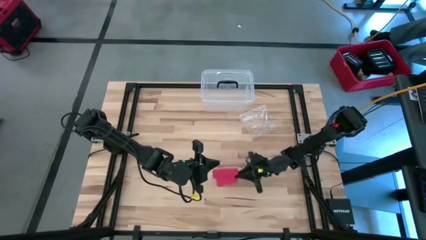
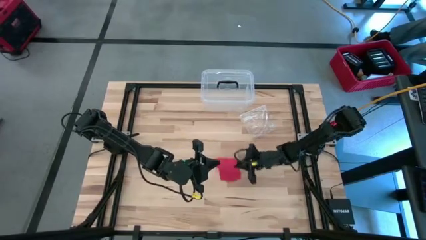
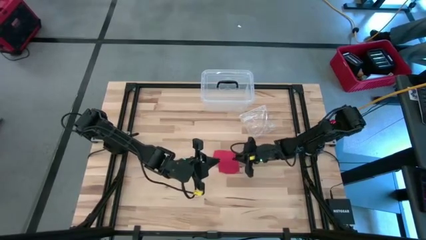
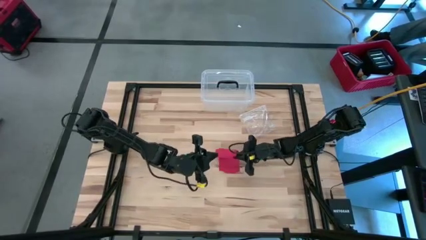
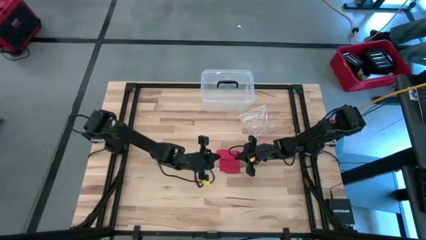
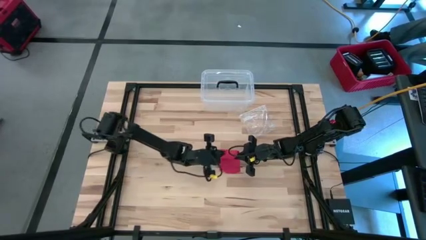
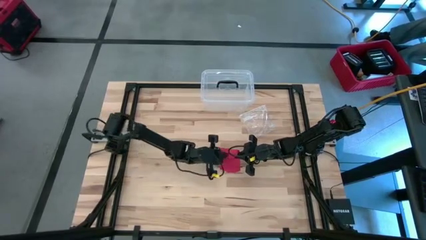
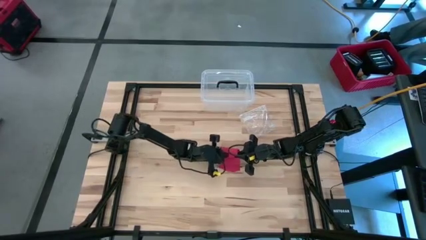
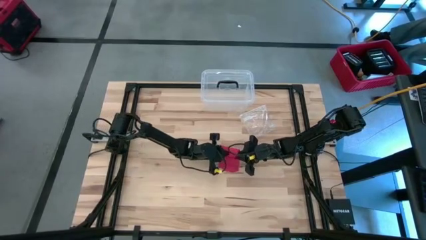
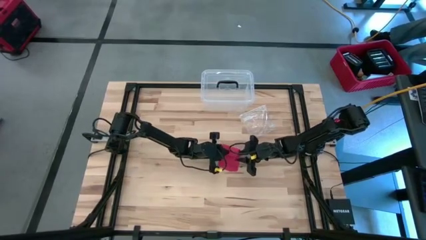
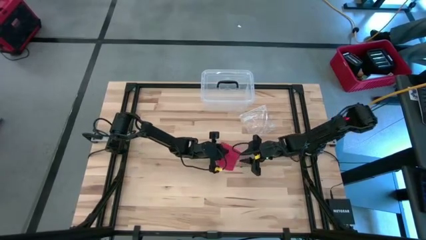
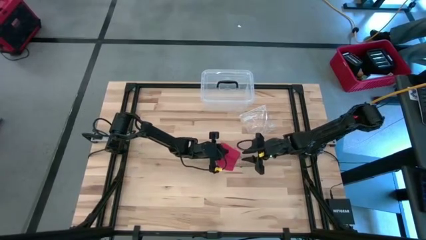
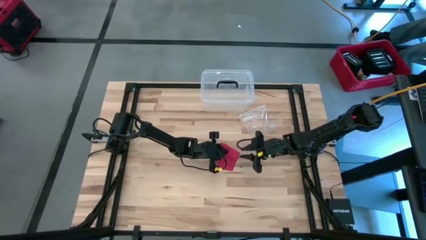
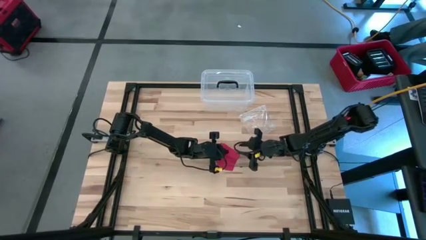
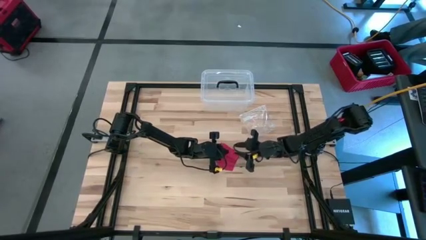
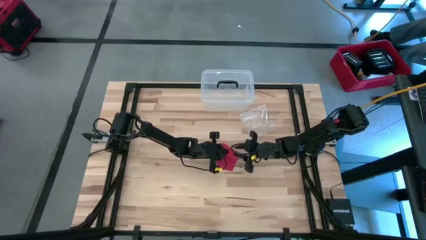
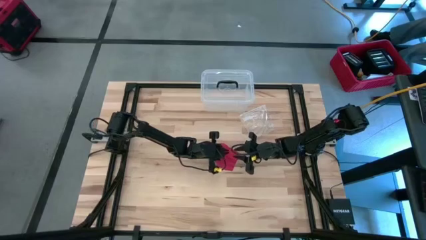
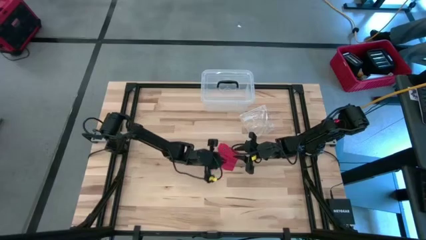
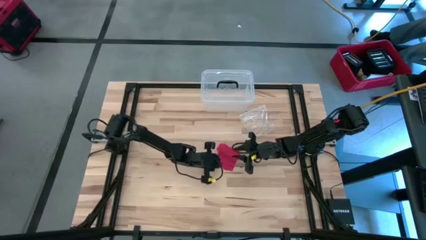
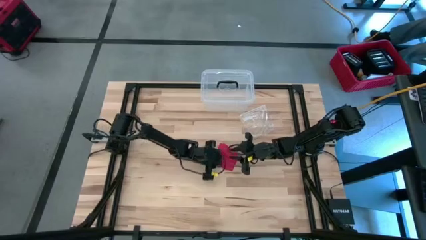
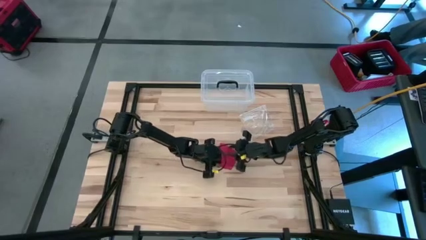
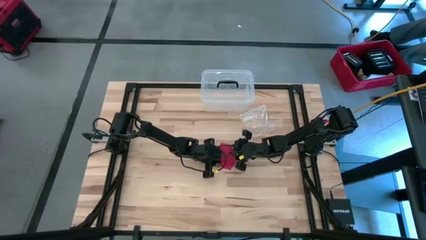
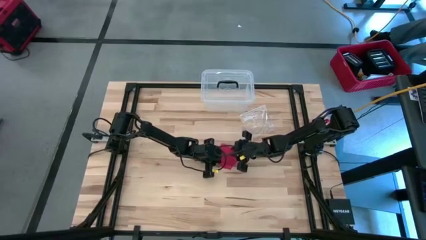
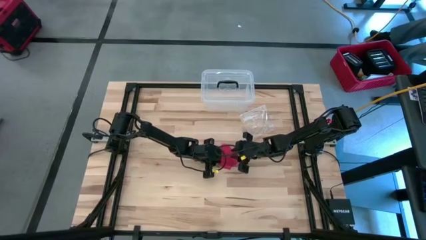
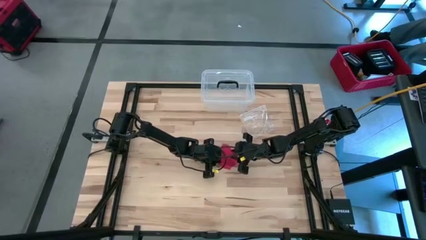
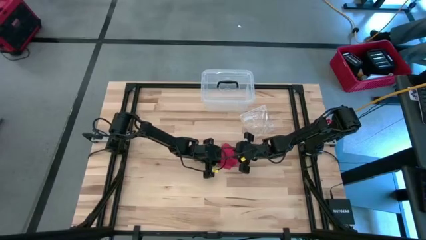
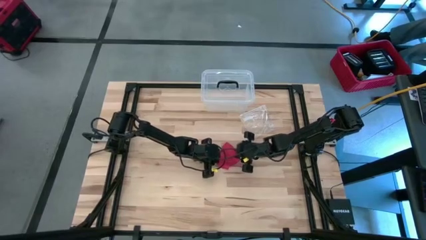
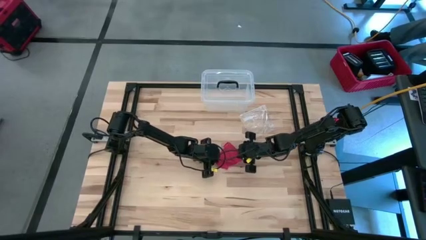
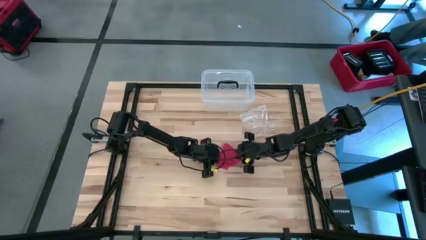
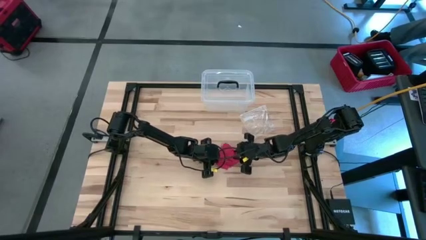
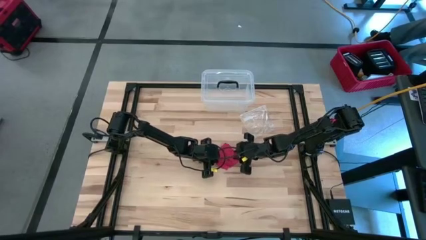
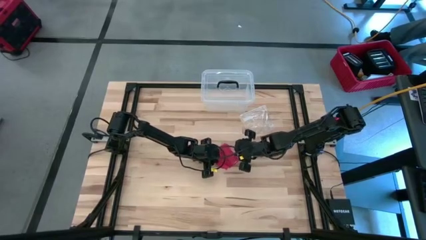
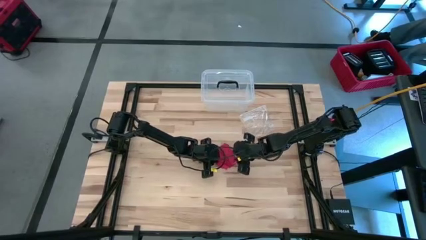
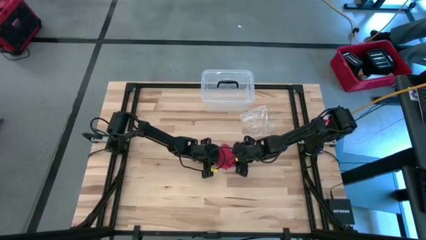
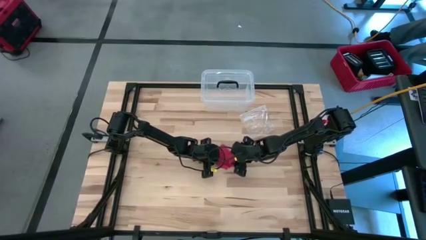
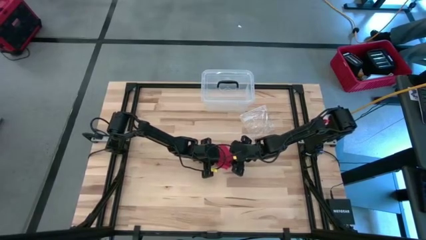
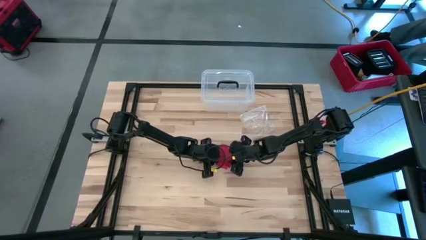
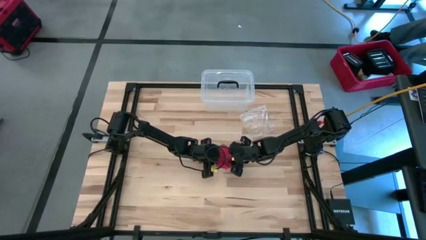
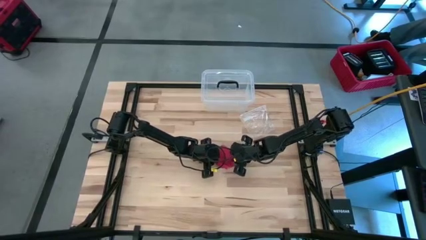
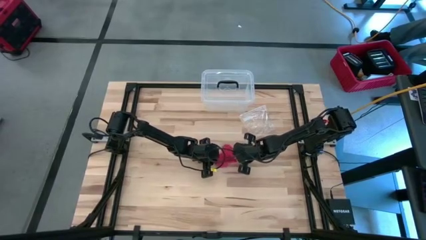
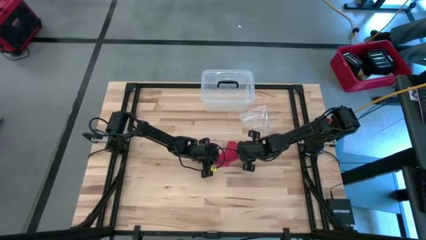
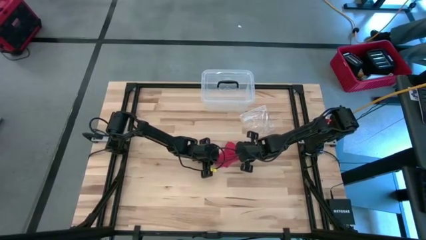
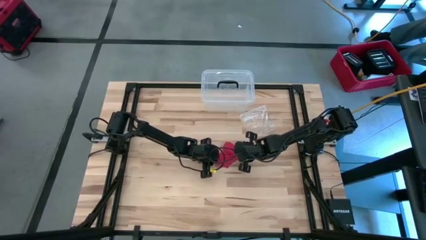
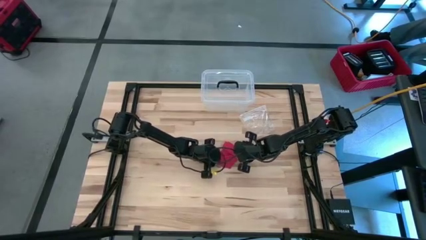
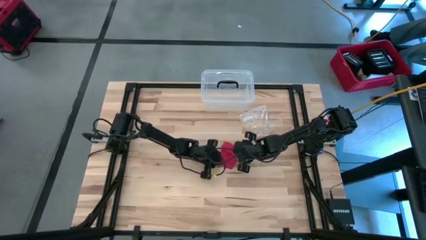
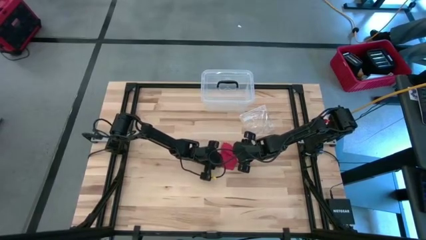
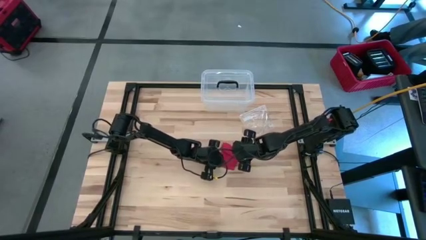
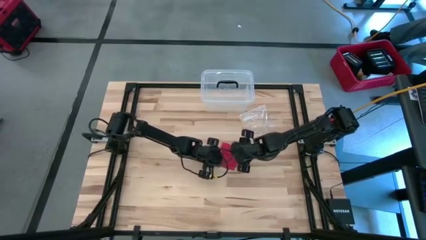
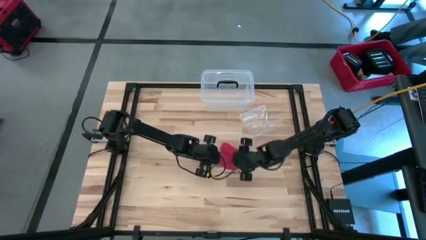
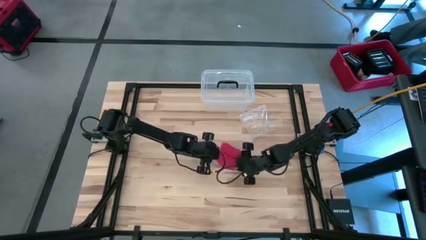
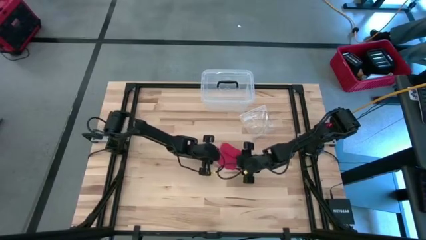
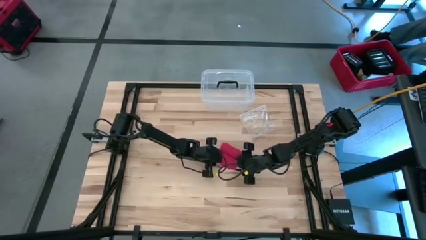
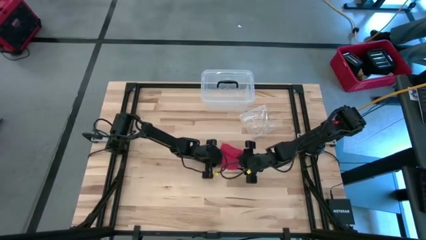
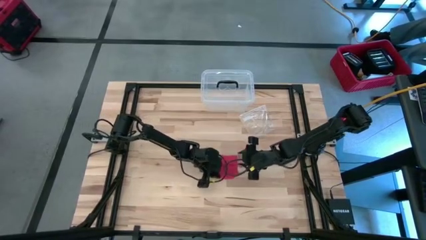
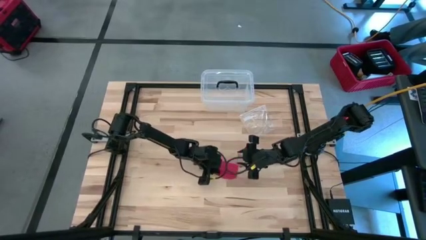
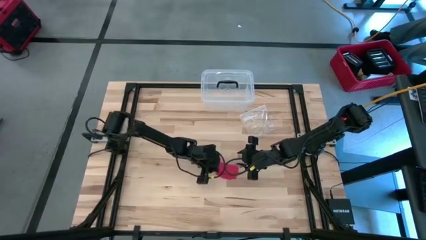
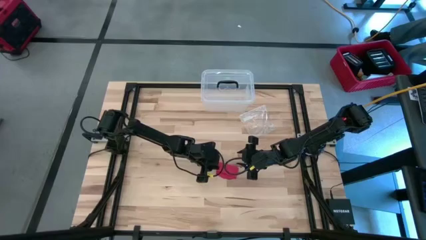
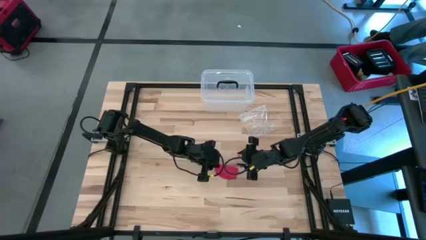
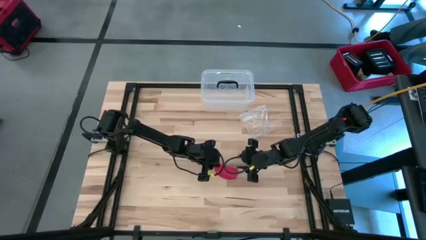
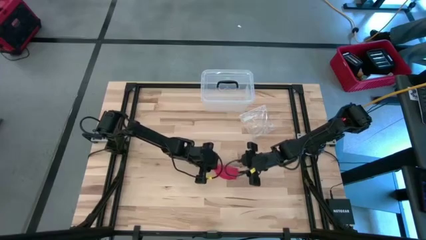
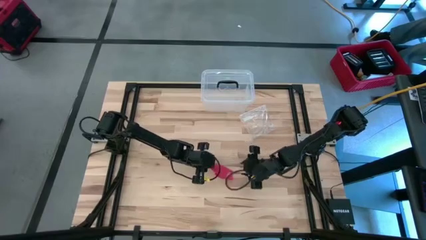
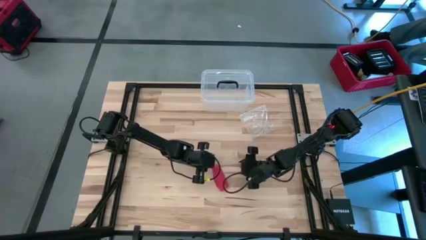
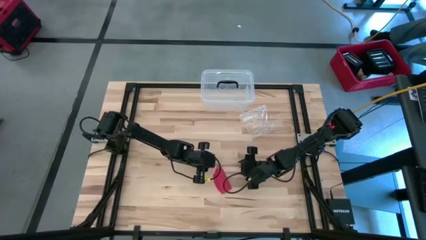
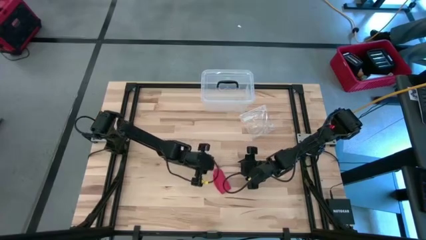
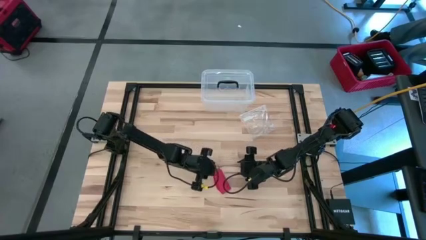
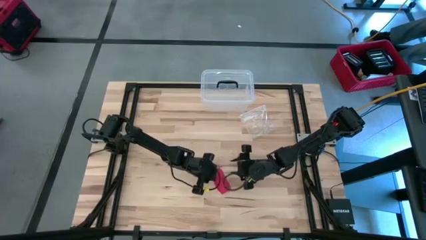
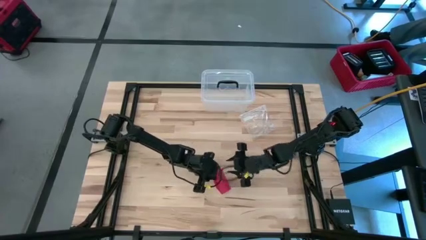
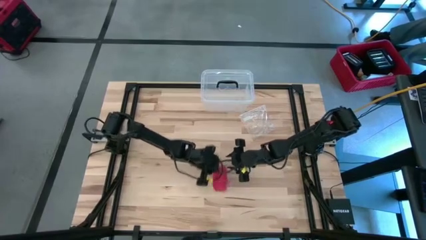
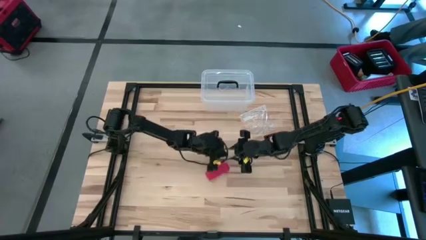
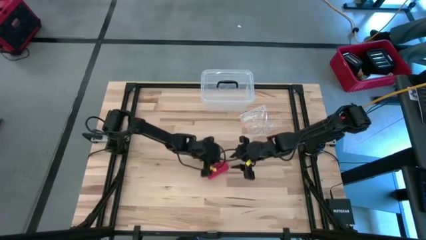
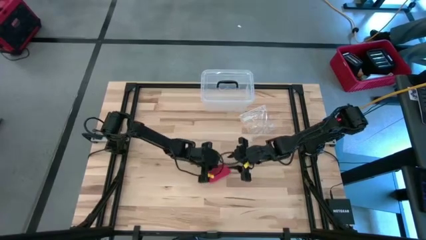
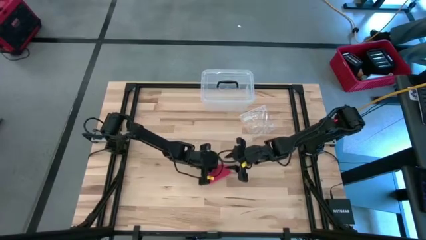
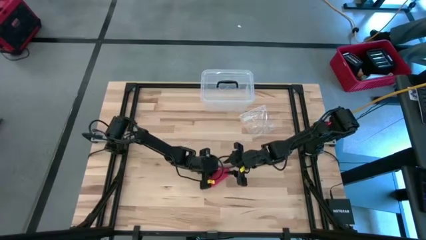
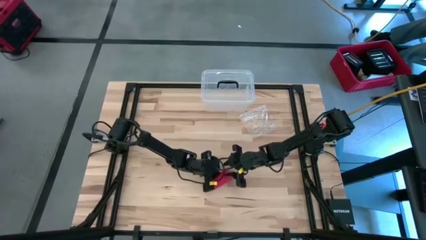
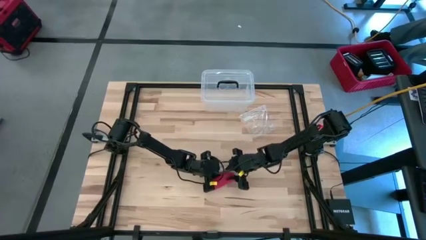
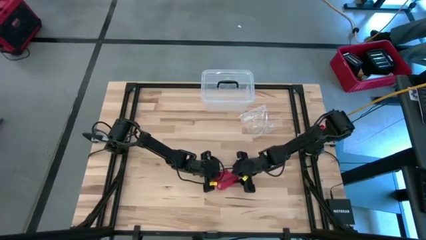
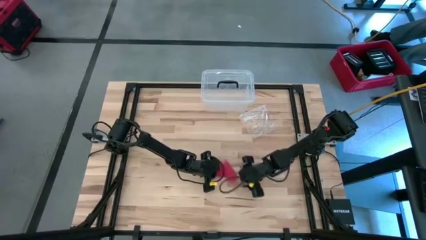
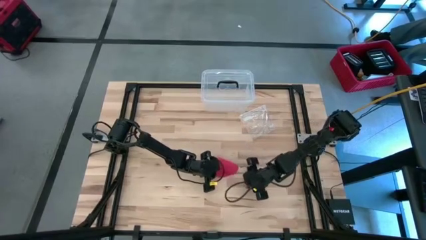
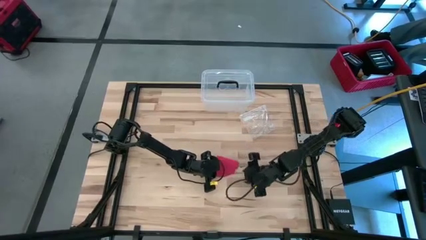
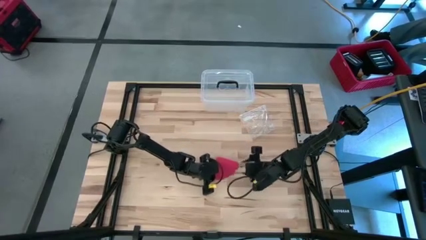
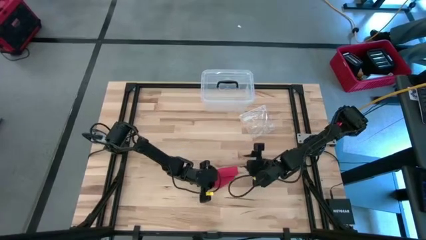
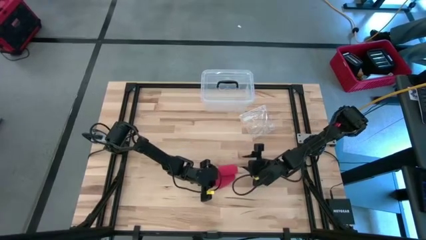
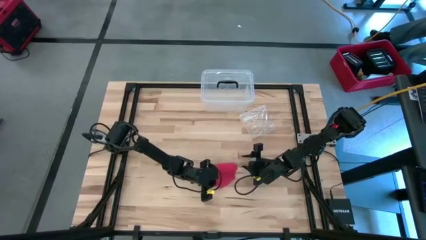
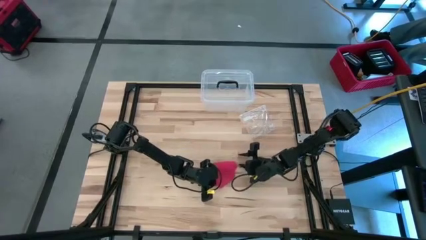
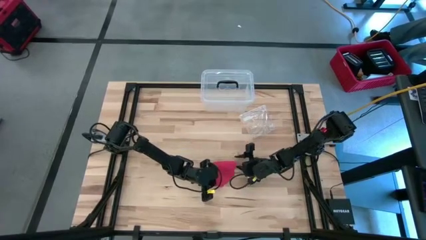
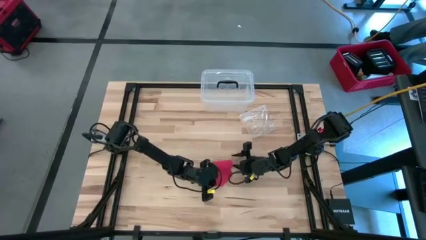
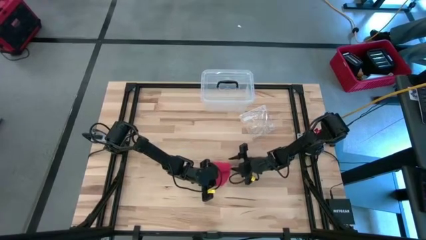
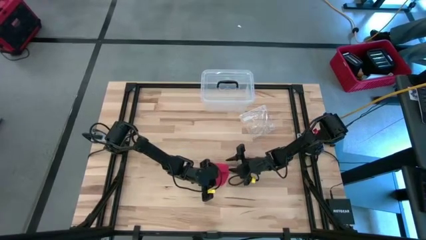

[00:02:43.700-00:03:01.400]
Task: Roll bandage
Roll the red bandage
